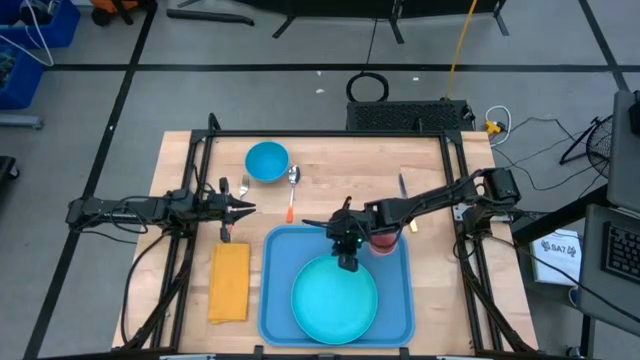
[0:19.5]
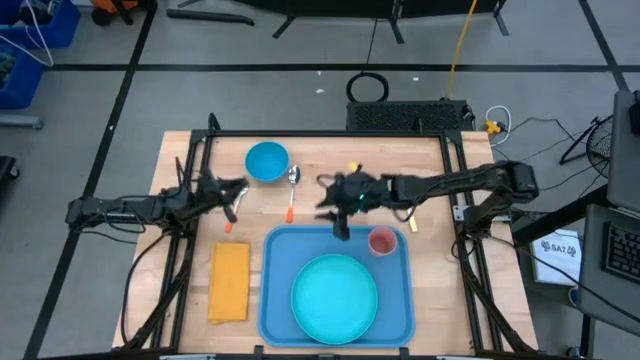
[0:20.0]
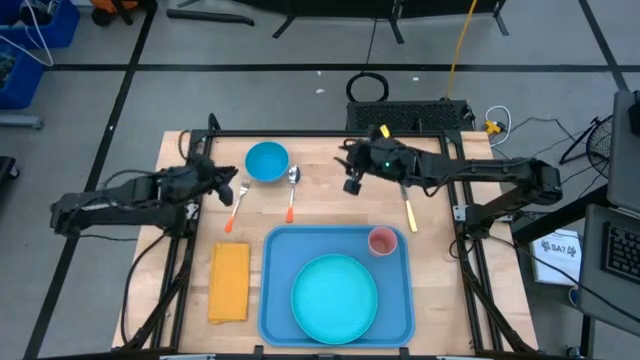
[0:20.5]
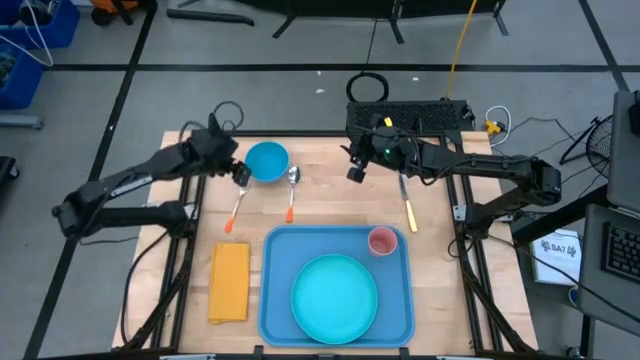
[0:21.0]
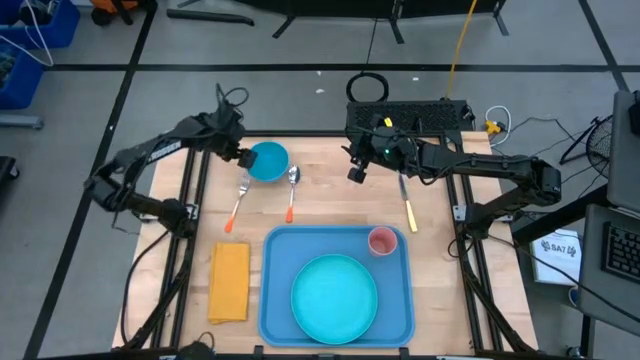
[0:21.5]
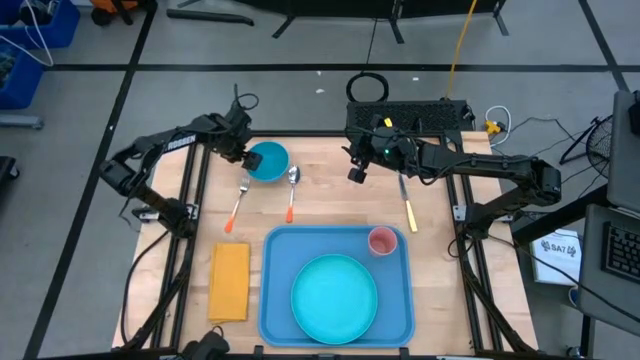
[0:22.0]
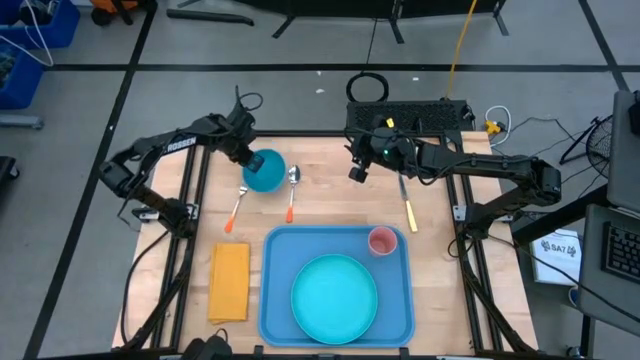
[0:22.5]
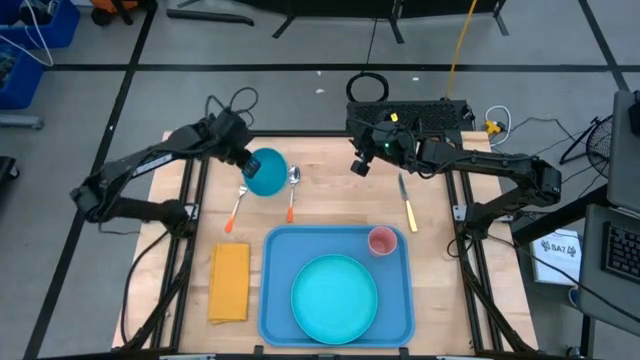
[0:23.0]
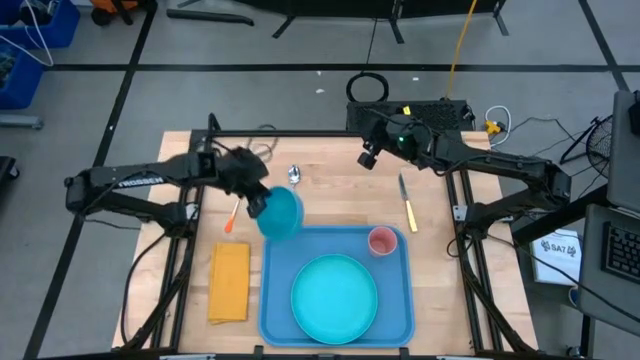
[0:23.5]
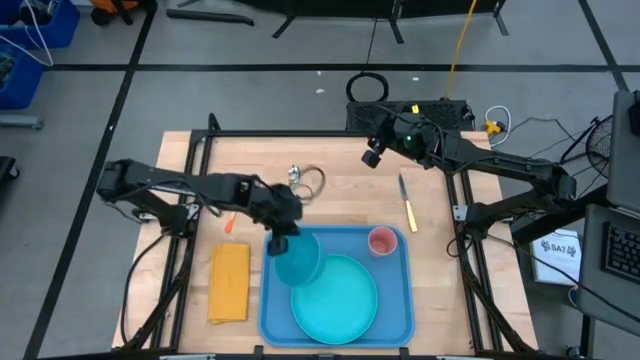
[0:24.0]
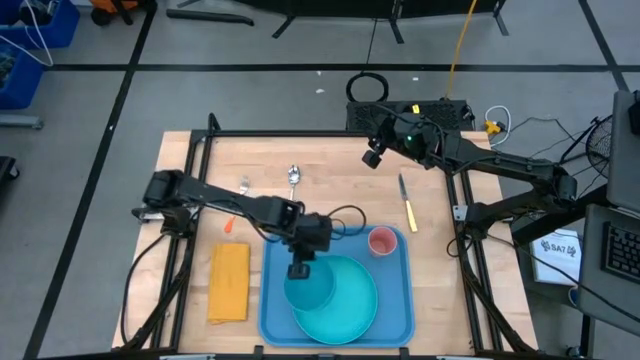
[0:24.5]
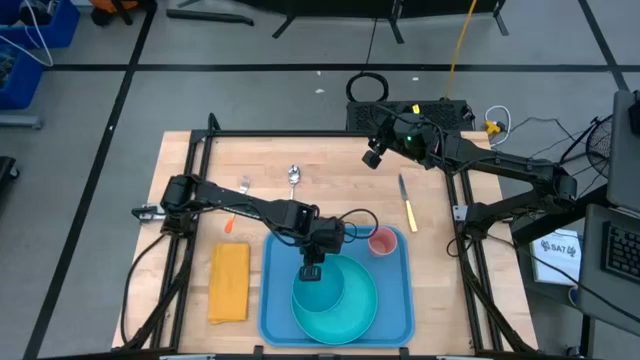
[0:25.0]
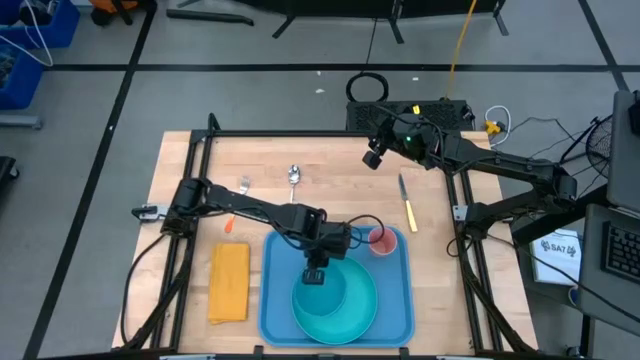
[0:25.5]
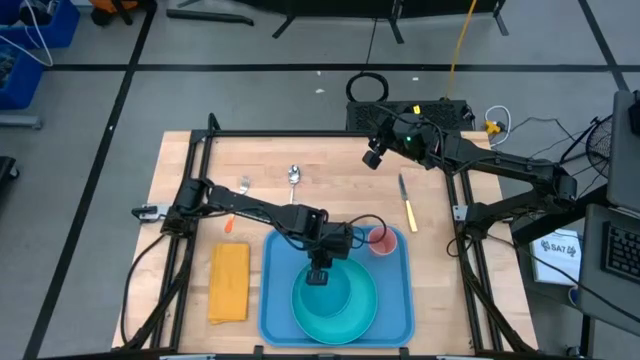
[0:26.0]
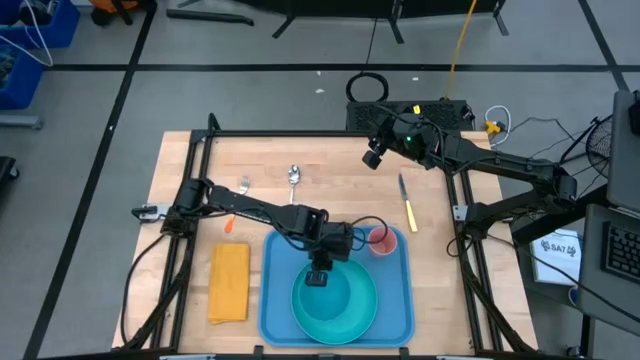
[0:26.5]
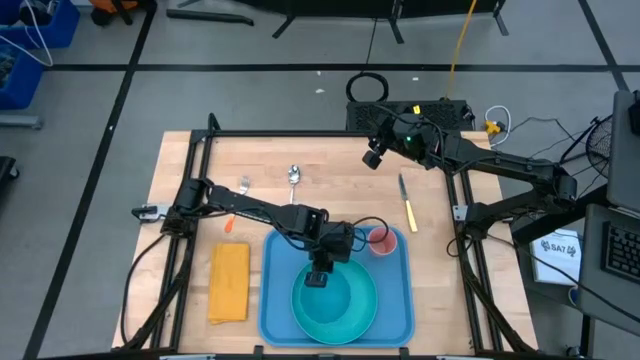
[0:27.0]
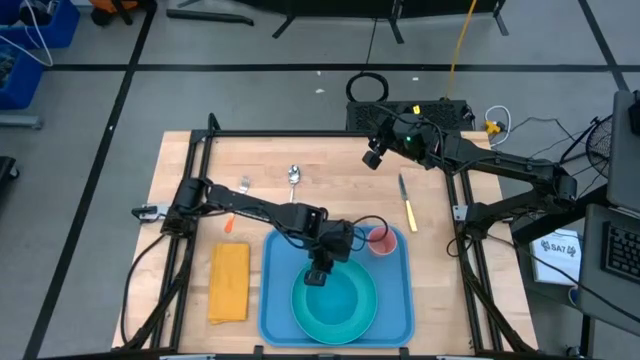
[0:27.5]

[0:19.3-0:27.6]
Task: Set up tray
Put the blue bowl on top of the blue plate

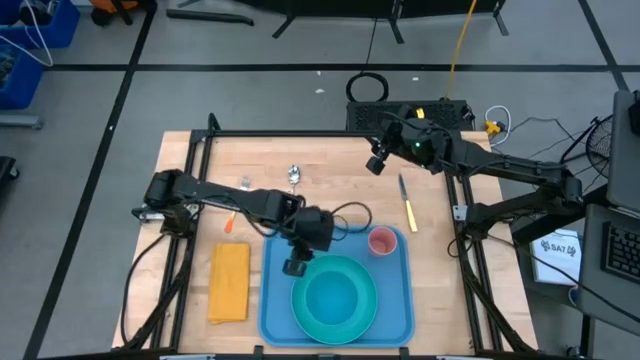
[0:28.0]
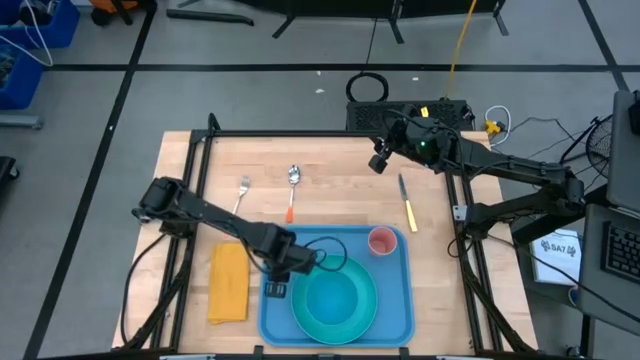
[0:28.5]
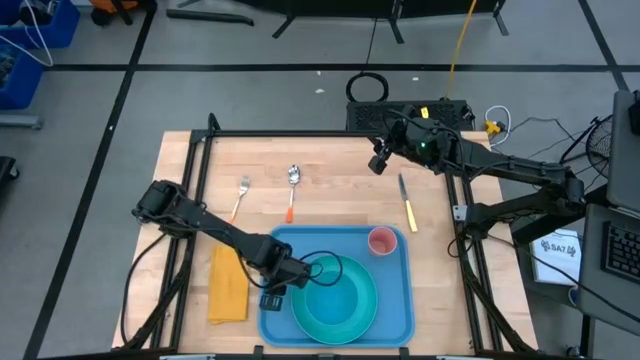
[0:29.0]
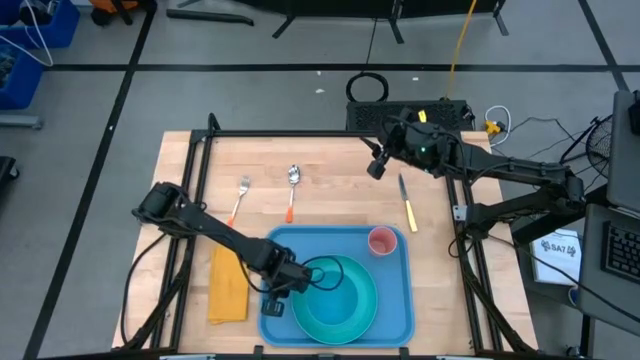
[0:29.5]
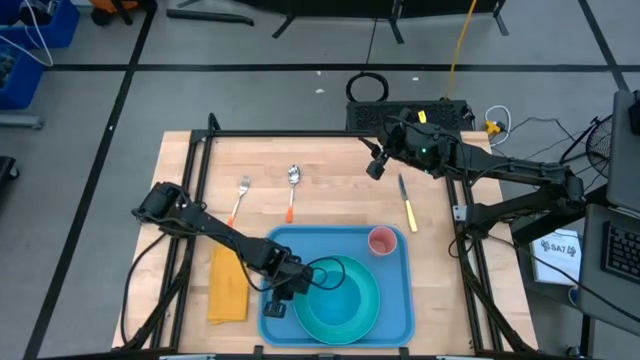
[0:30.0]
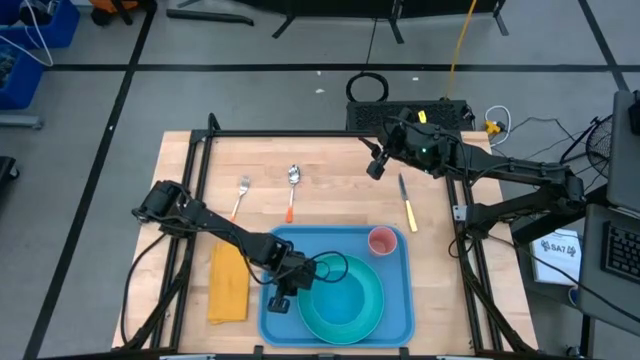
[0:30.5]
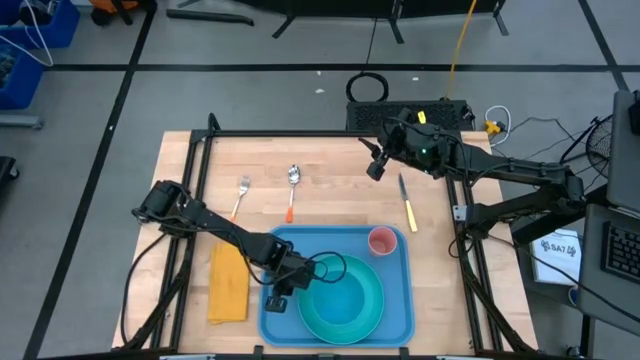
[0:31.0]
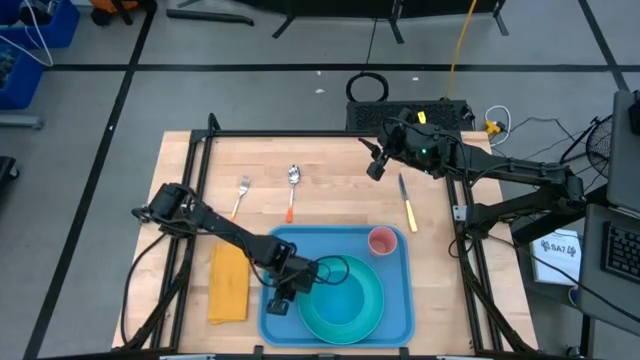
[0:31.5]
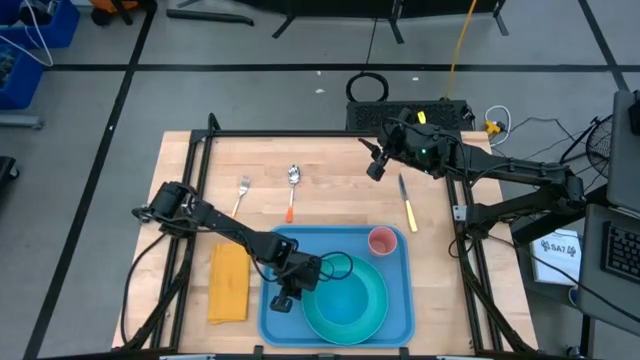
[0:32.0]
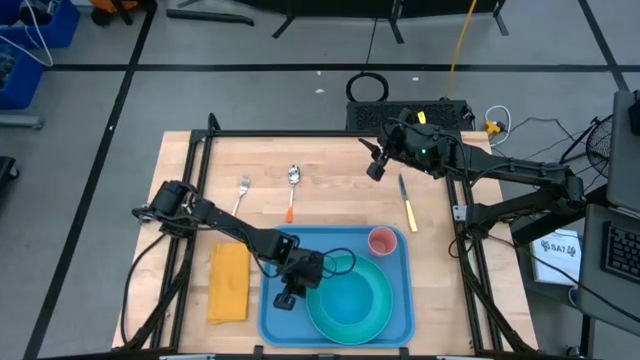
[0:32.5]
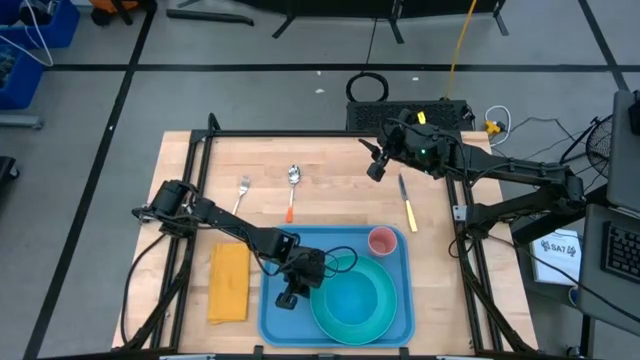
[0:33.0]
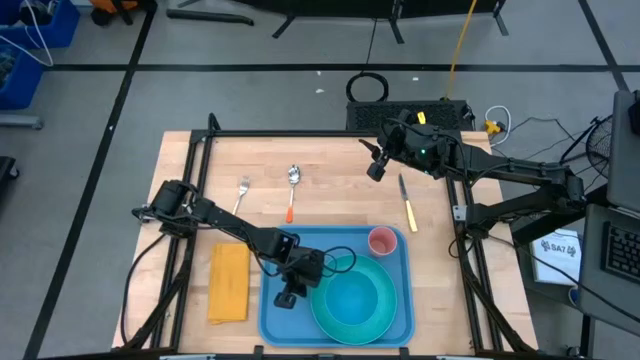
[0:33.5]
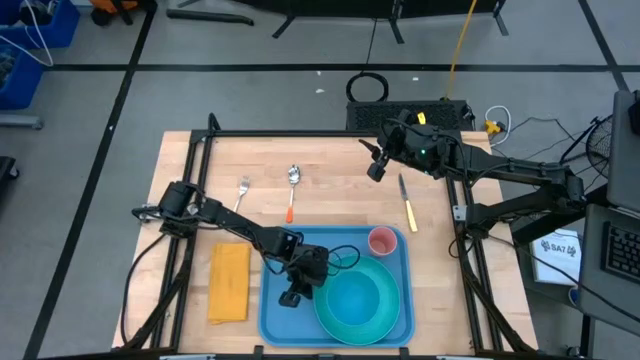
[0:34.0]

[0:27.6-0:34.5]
Adjust the blue plate on the blue tray

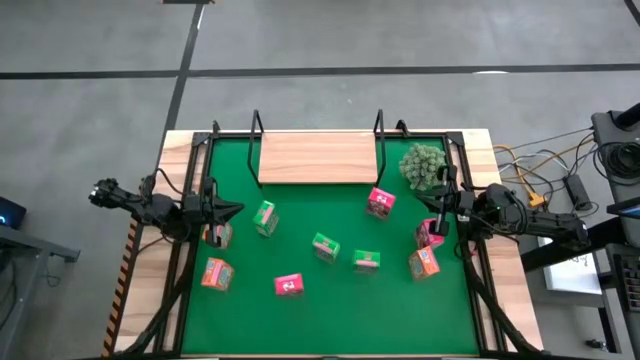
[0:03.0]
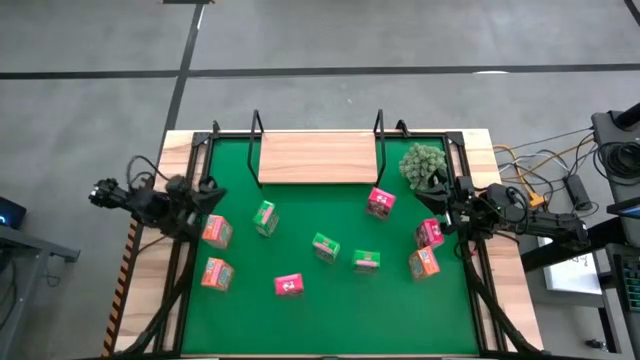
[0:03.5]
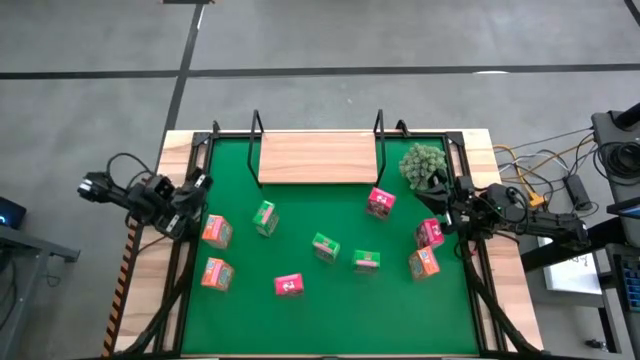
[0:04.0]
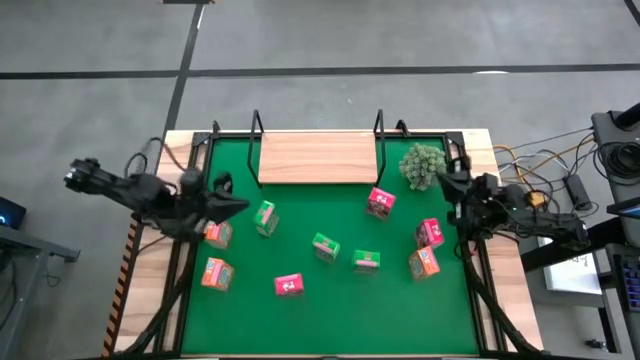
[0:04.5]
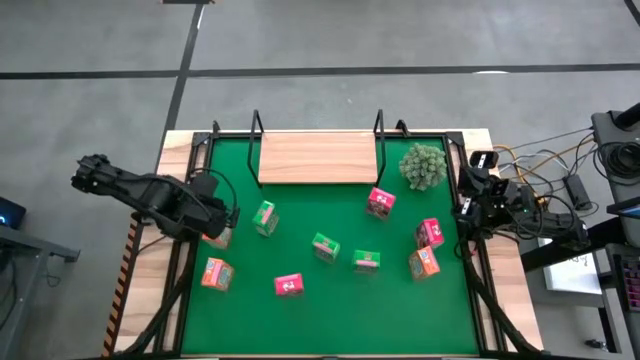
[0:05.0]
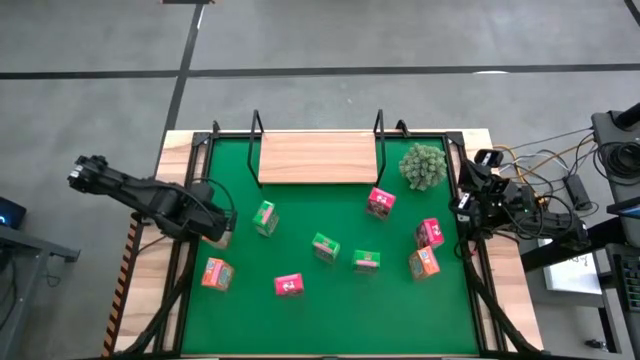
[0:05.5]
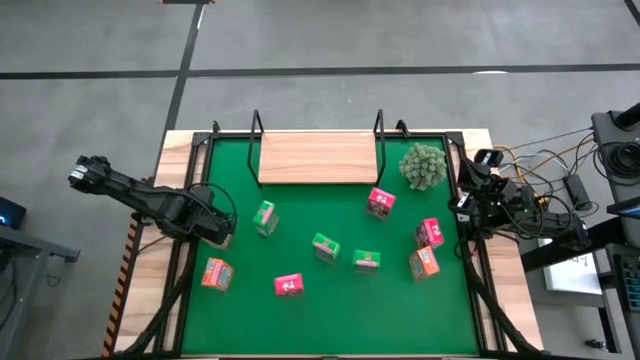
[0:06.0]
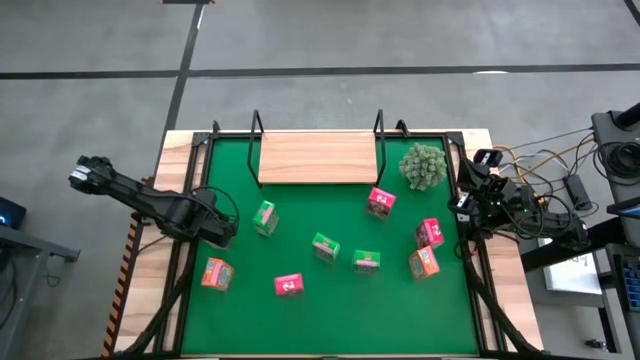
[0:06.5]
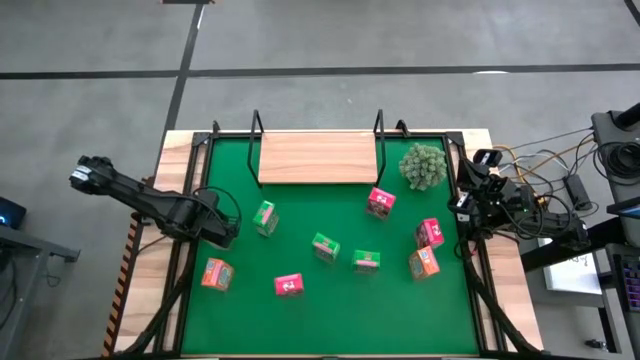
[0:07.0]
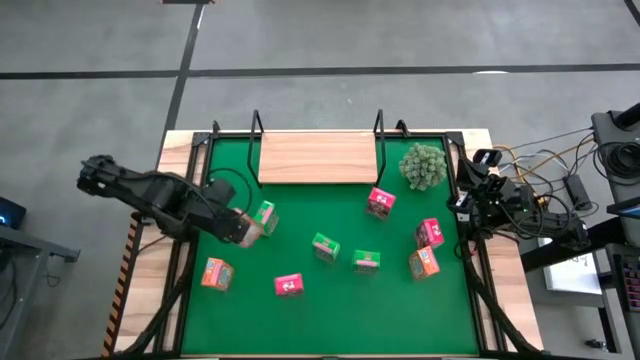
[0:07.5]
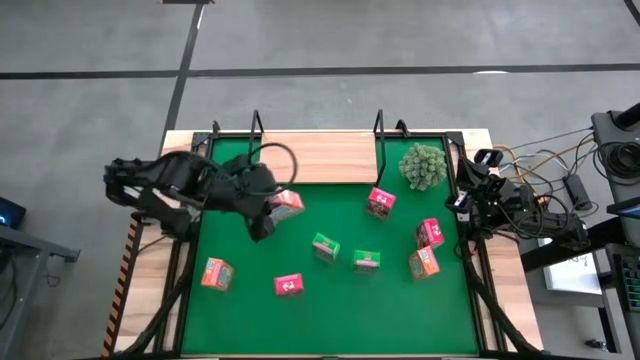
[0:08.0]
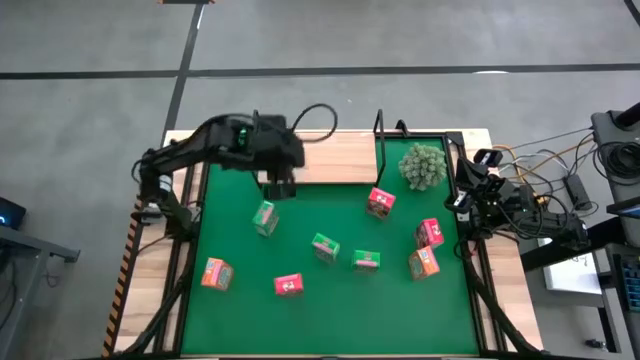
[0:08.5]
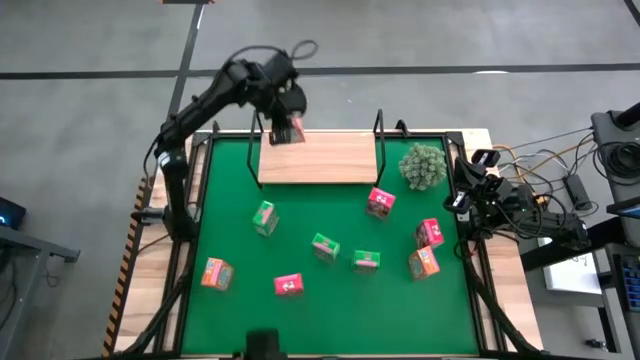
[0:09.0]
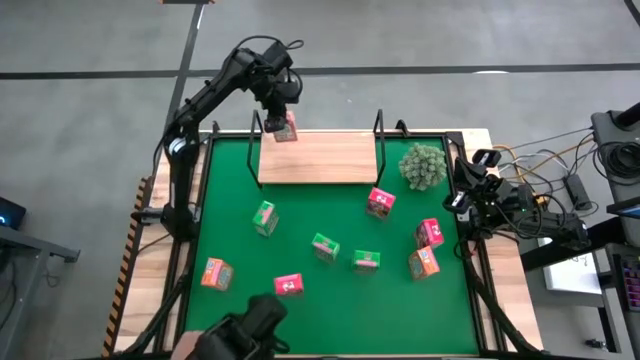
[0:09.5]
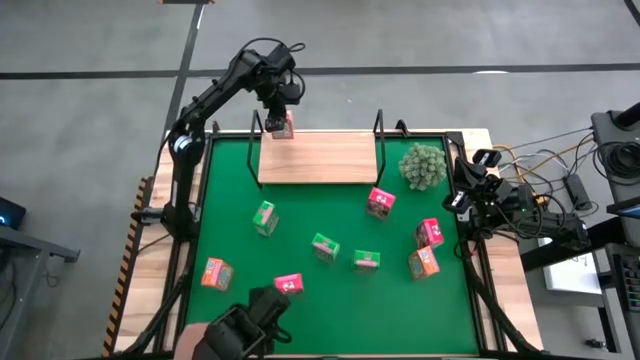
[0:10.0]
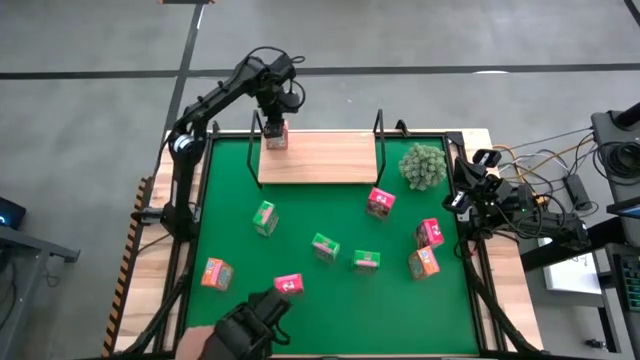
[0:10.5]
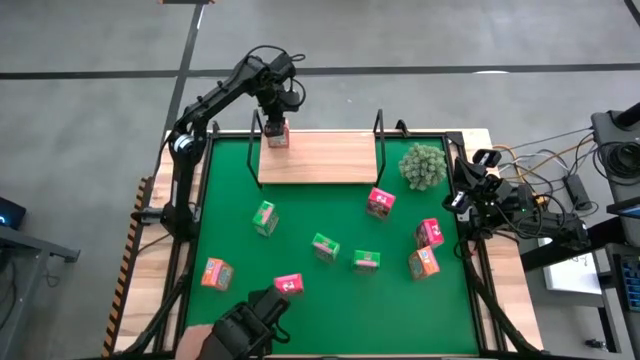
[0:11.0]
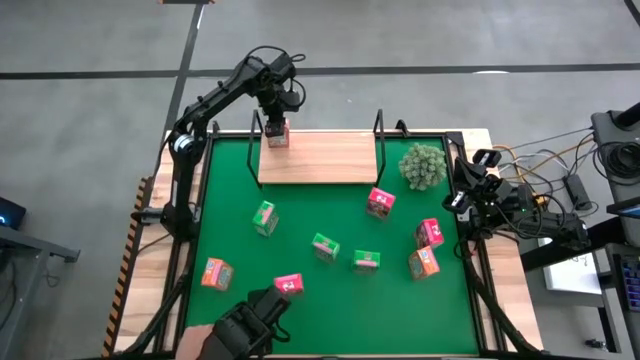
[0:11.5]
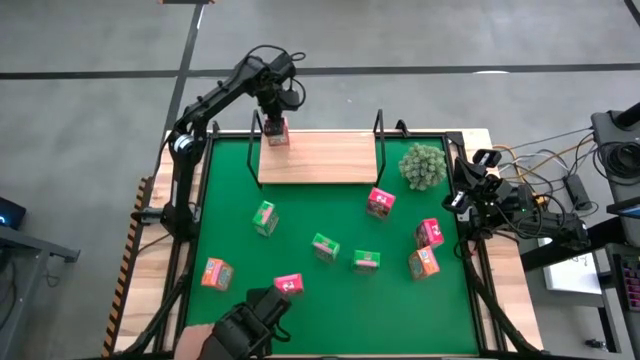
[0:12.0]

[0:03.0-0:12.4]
Task: Stack cereal on shelf
Put the top orange cereal box on the shelf
